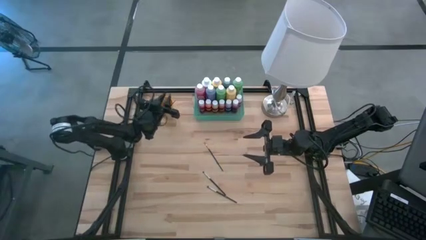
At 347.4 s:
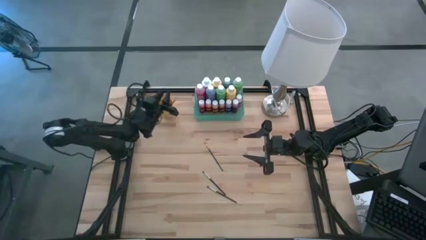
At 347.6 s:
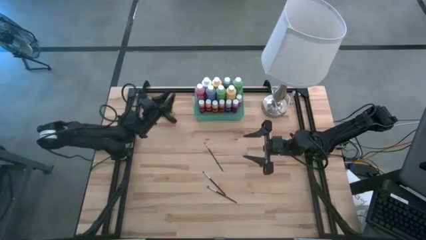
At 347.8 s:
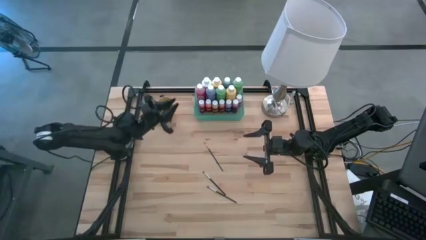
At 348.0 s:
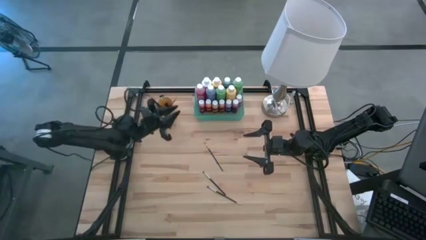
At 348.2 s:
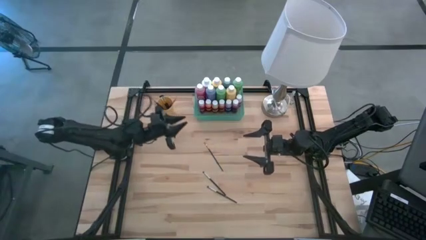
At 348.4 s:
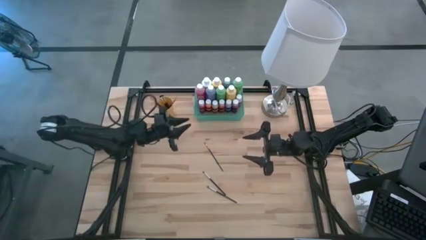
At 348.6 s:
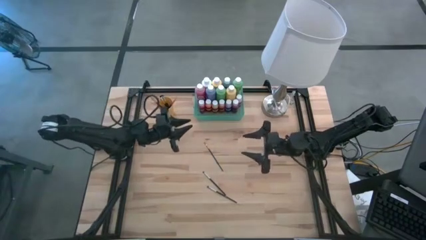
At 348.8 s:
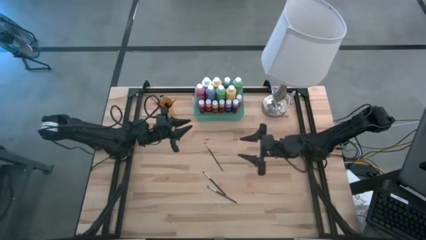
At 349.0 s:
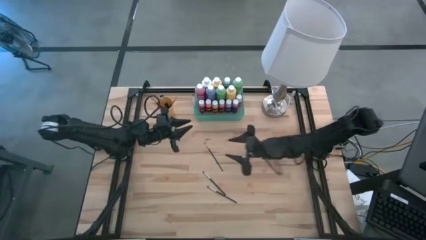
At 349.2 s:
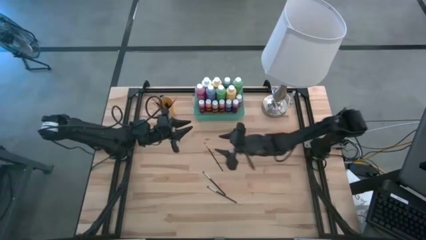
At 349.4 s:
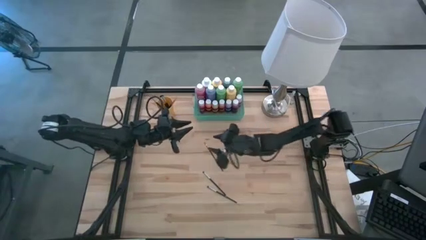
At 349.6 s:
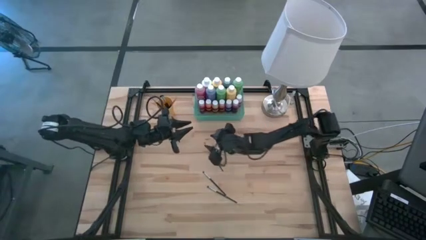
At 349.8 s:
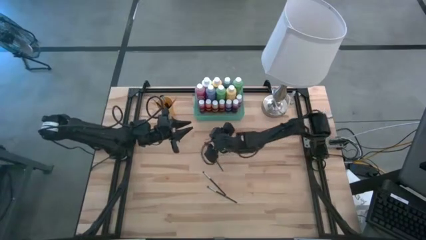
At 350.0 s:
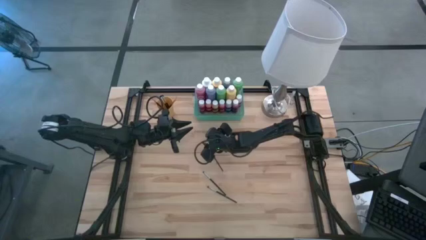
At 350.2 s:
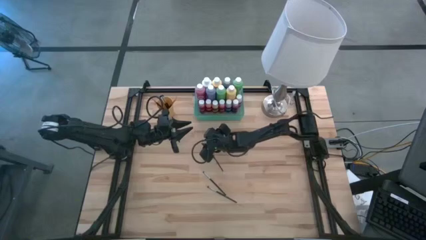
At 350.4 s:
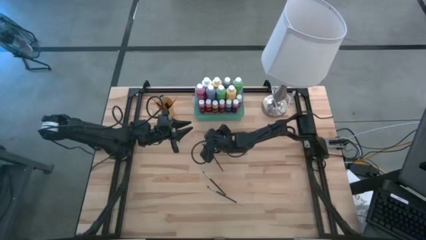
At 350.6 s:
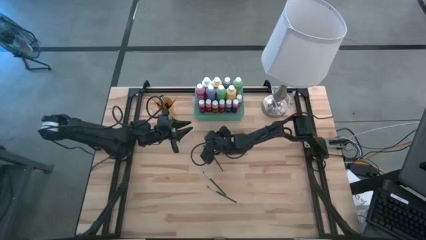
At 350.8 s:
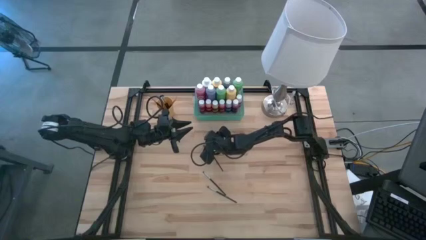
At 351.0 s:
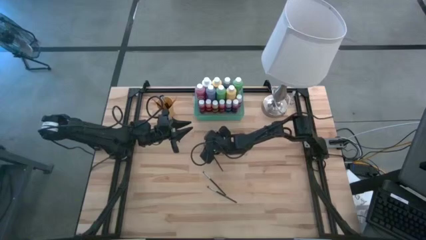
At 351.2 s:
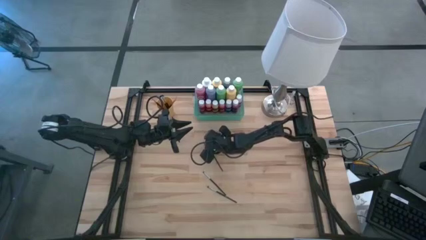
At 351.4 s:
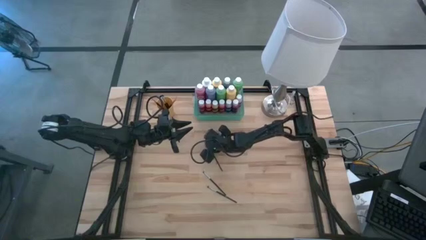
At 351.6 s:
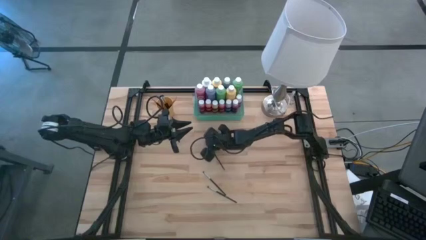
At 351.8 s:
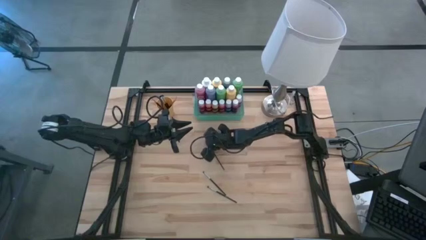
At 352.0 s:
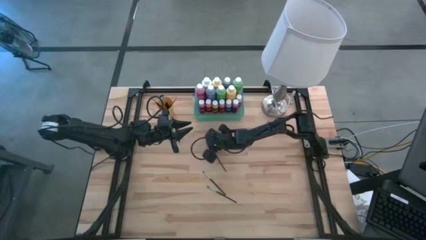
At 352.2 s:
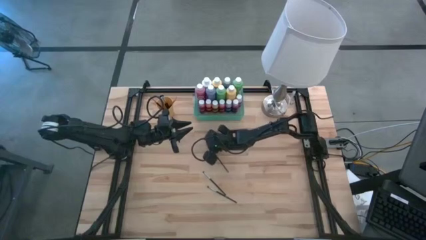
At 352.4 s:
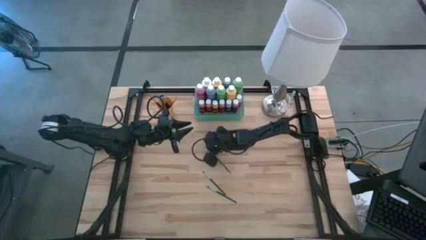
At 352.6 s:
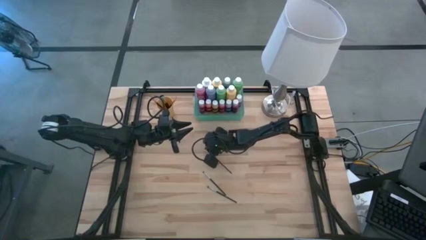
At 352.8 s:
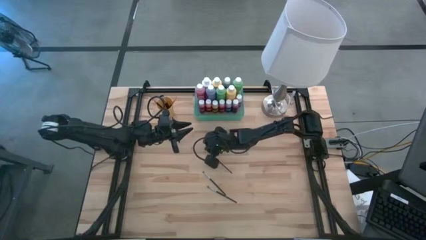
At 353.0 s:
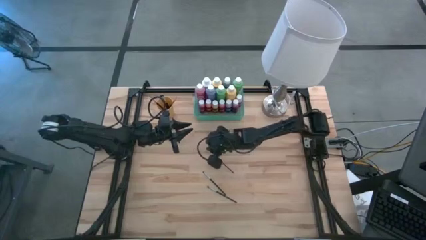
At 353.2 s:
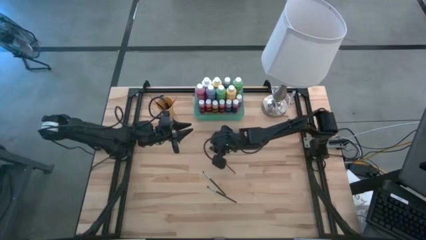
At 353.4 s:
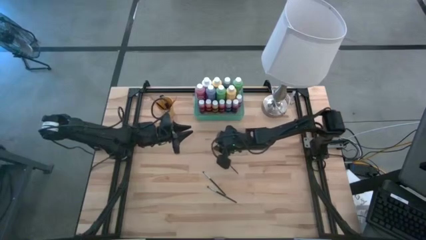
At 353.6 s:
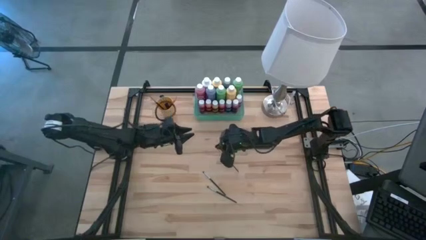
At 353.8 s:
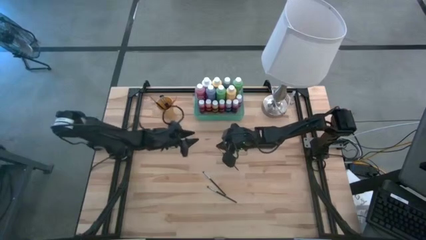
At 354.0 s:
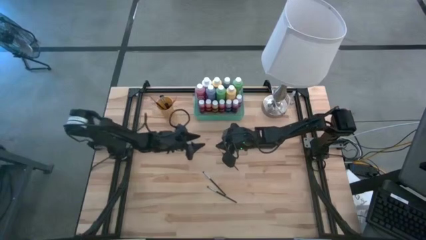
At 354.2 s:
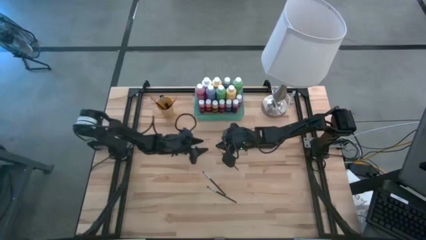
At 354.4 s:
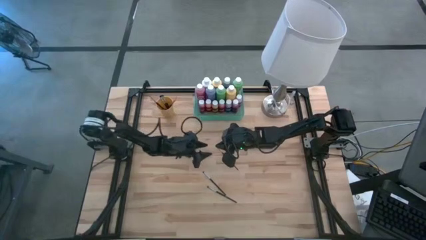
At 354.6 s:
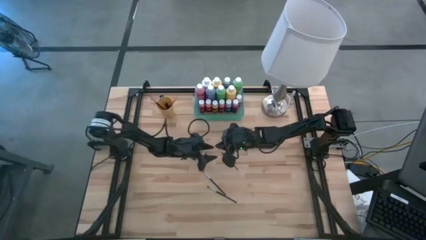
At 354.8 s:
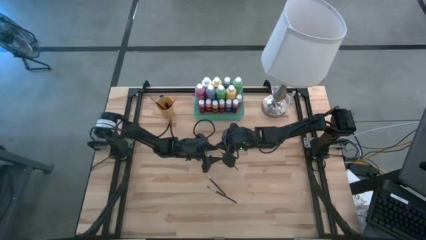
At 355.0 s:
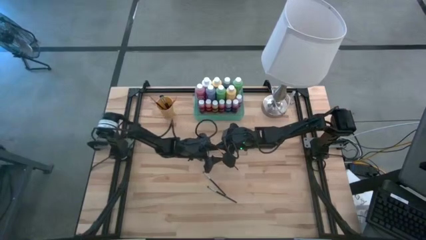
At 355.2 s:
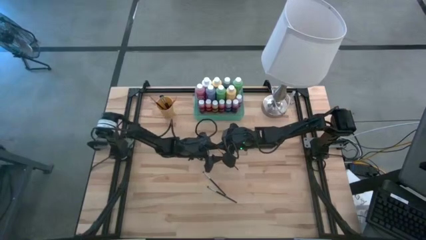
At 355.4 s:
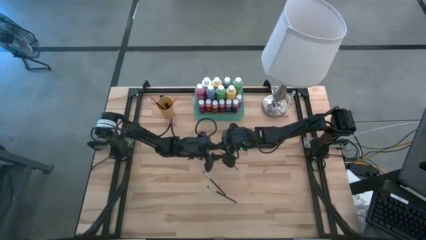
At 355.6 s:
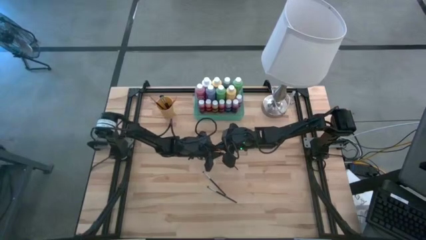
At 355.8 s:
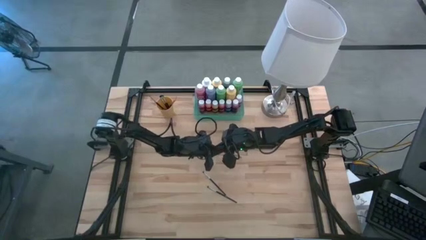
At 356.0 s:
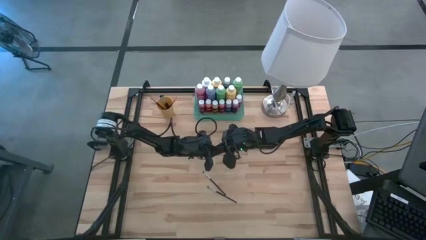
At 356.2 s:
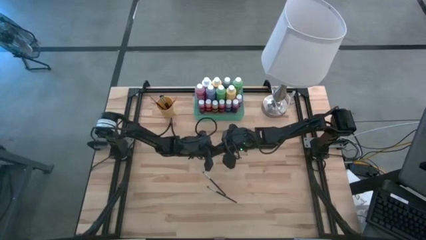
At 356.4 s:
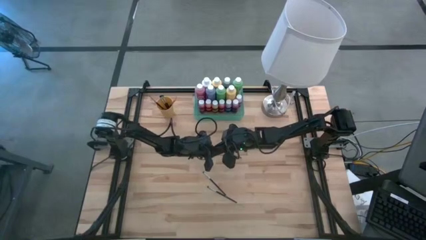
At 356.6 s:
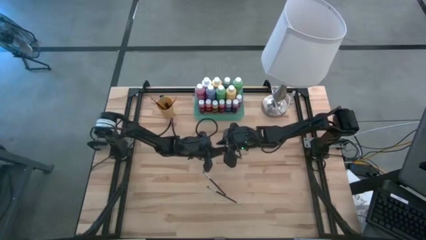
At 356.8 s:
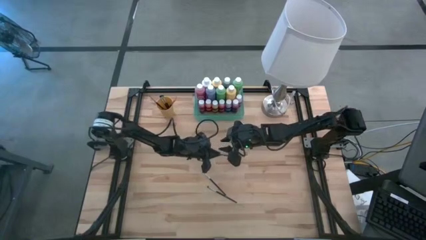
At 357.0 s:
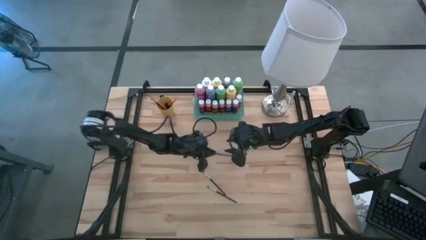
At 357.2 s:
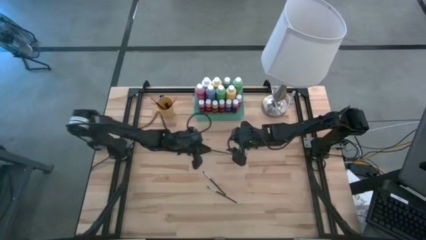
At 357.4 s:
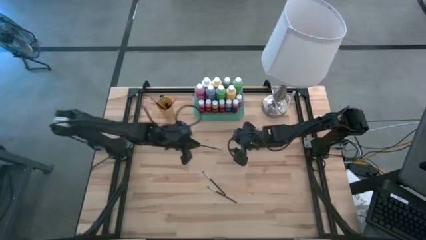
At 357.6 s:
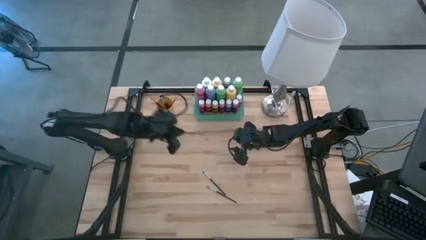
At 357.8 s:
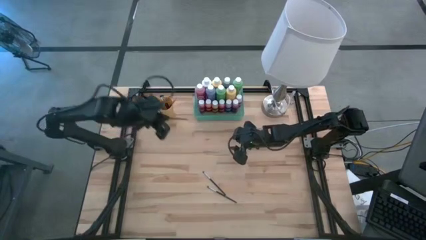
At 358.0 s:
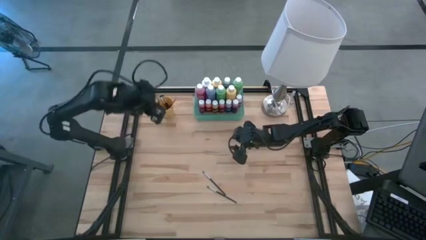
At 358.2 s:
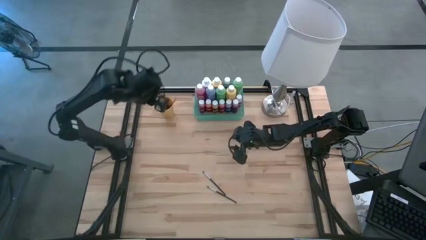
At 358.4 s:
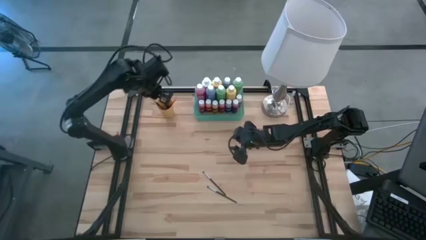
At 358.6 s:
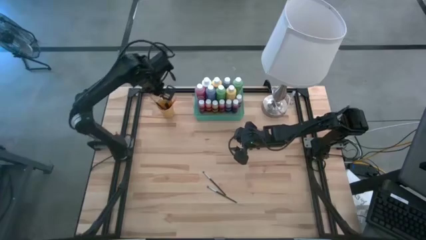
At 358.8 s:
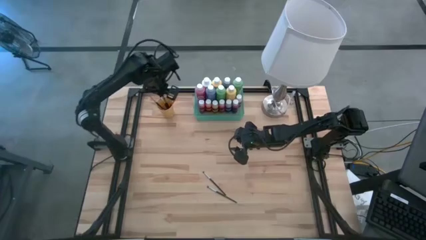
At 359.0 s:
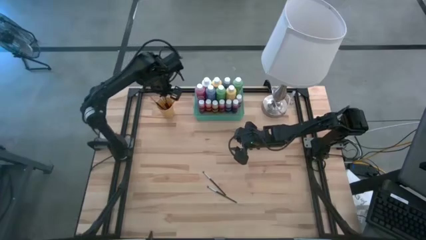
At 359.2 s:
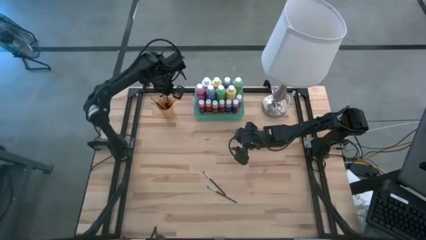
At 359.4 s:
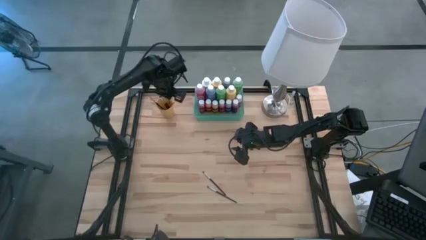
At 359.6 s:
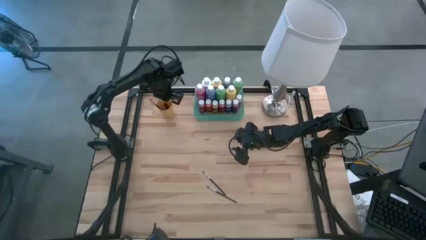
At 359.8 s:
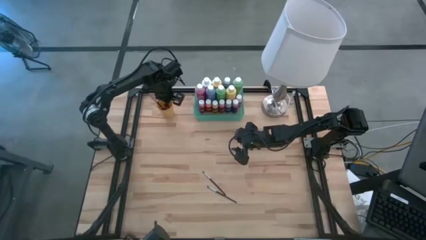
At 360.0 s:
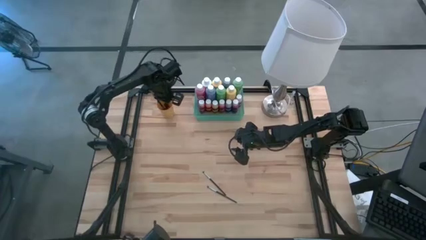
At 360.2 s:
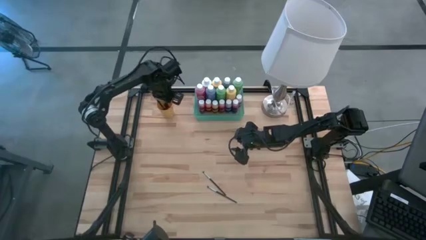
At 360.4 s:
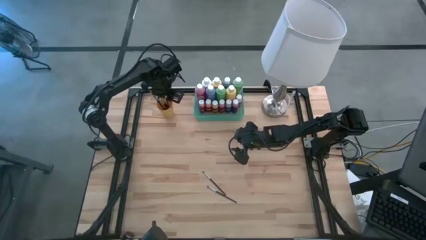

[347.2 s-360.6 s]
Task: Pick & Place Paint Supplies
Put the gold paintbrush into the orange cup

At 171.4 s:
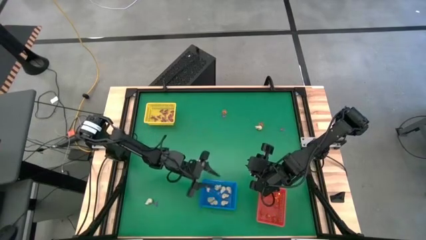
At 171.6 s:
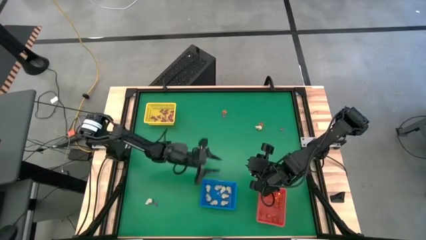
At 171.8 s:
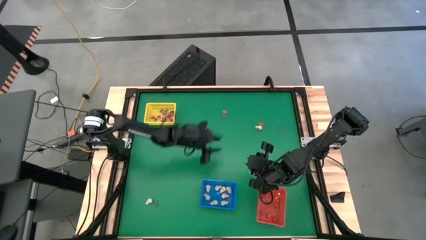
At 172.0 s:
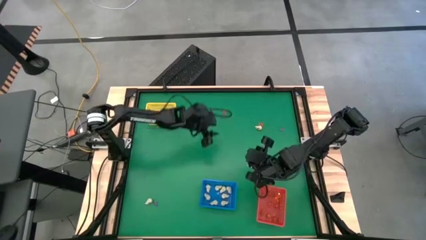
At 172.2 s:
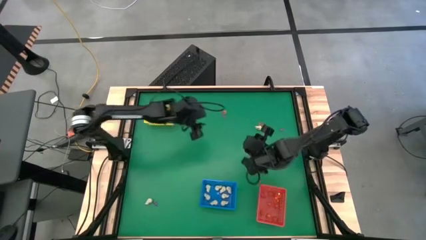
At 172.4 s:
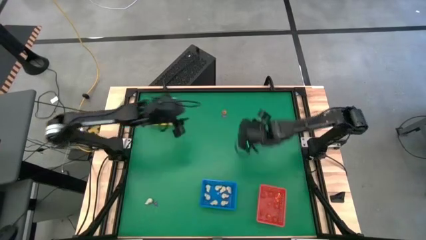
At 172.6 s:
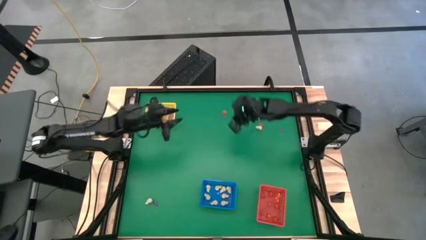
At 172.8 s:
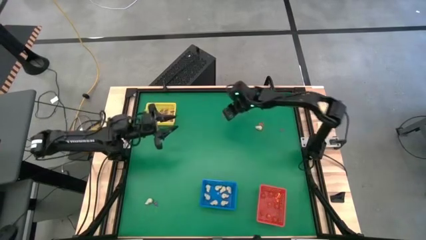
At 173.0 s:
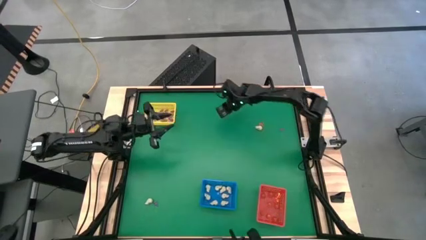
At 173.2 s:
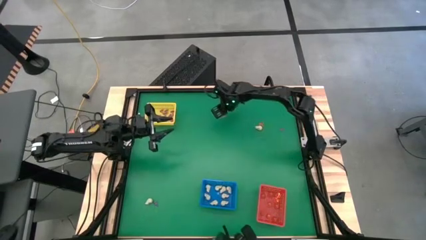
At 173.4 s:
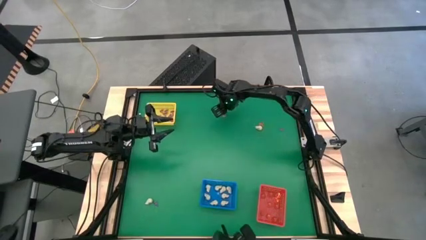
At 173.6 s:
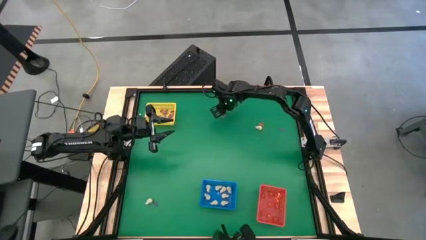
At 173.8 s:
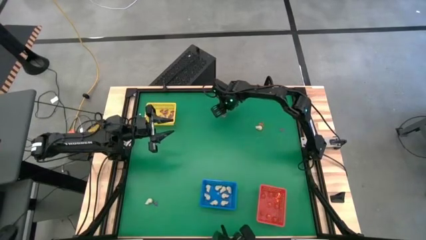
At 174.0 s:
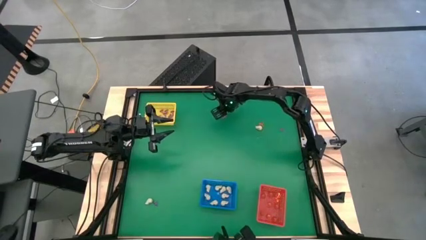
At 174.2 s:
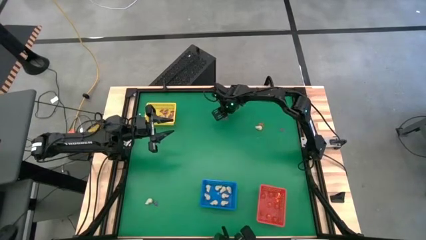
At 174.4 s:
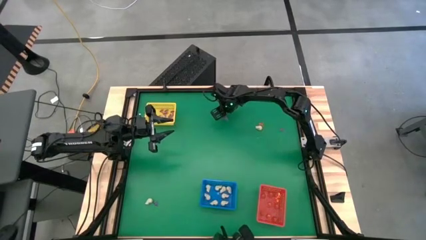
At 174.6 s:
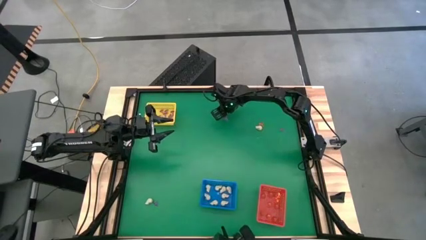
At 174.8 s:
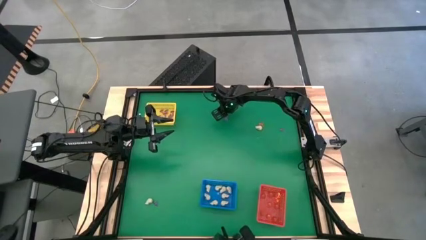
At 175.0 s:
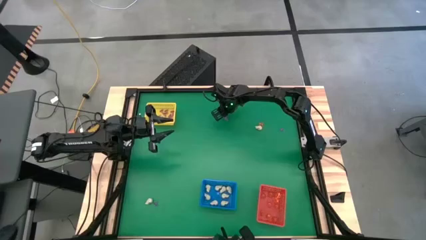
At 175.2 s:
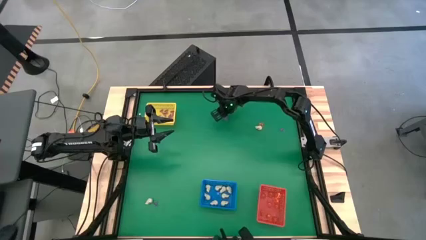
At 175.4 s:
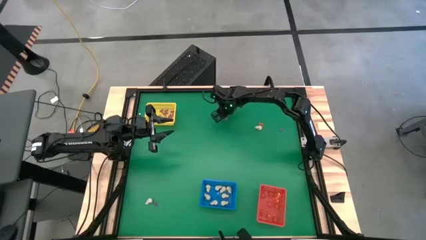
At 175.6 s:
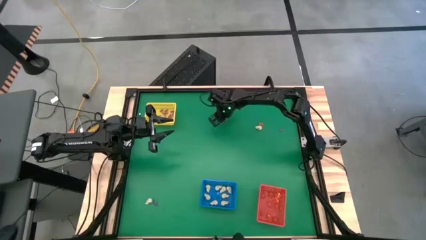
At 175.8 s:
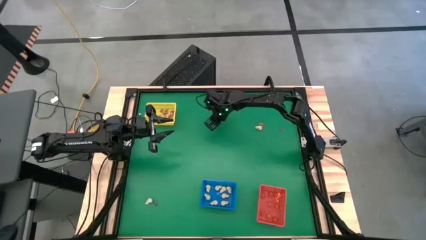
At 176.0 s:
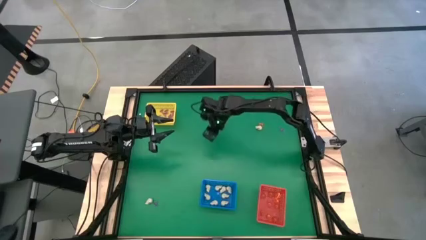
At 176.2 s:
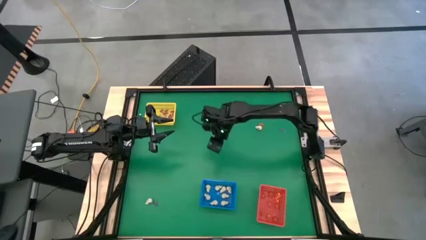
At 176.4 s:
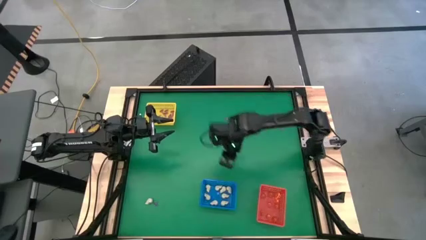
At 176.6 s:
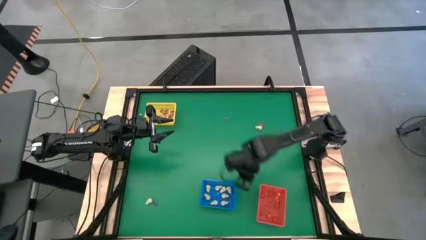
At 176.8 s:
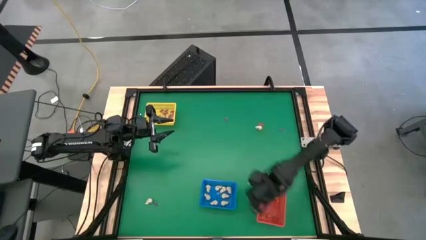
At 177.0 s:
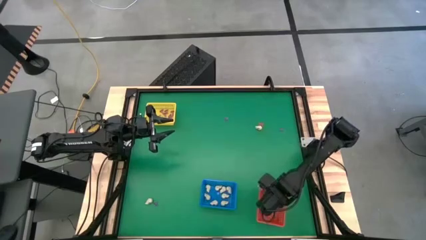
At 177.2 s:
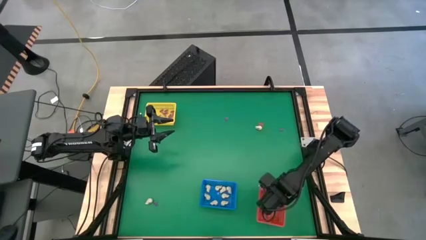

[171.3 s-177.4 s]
Task: Sort Halloween decoration
Put the orange pumpkin toy into the orange basket
